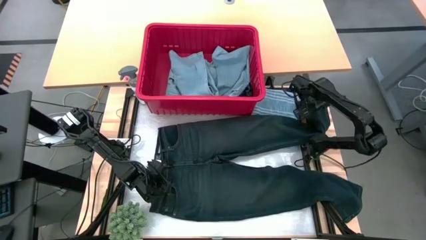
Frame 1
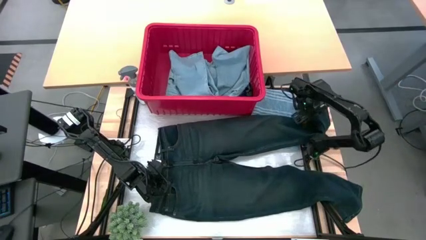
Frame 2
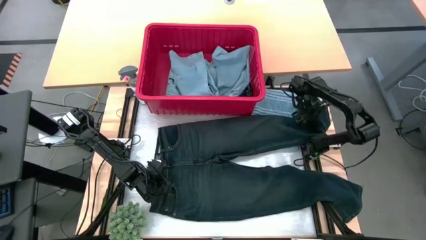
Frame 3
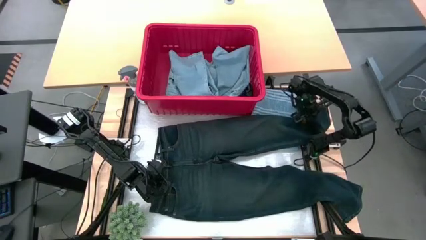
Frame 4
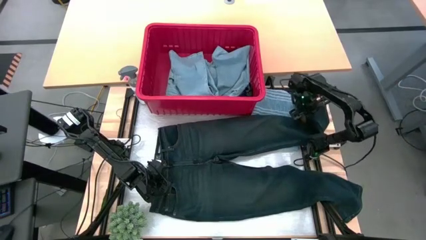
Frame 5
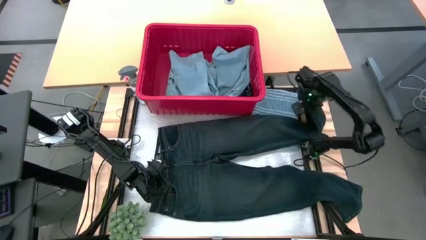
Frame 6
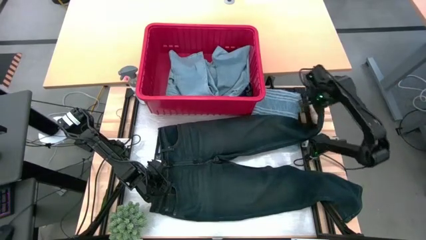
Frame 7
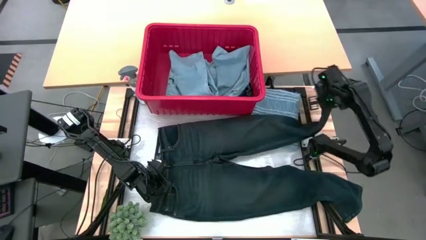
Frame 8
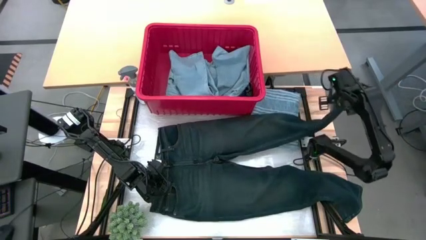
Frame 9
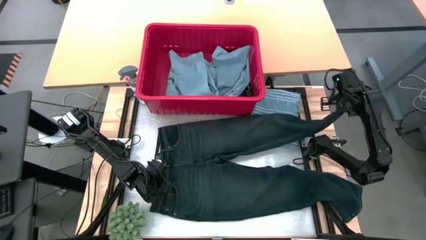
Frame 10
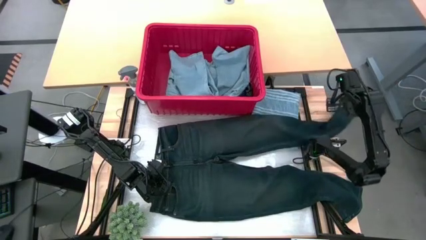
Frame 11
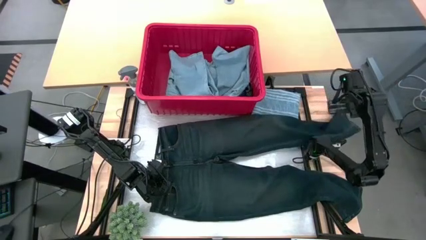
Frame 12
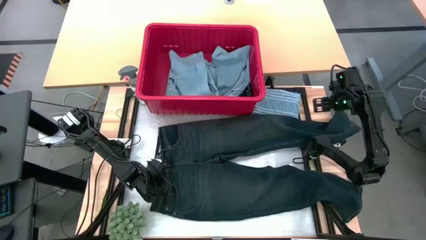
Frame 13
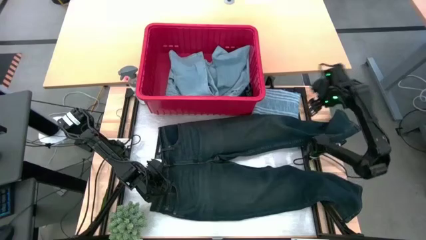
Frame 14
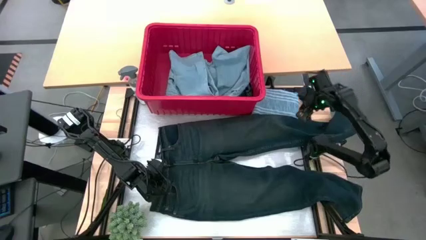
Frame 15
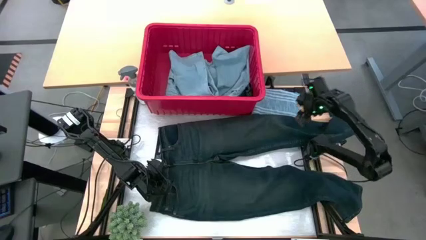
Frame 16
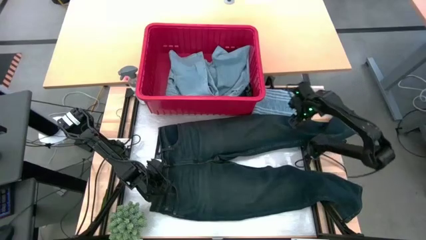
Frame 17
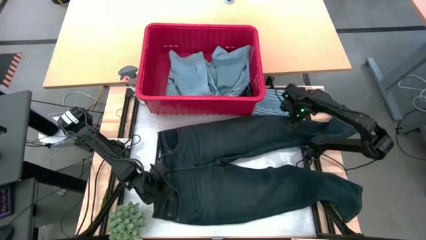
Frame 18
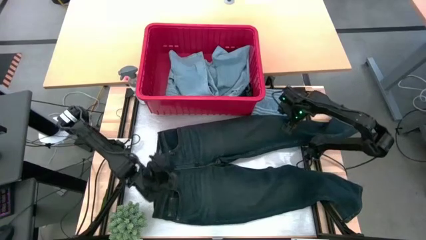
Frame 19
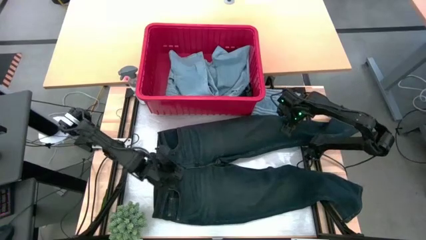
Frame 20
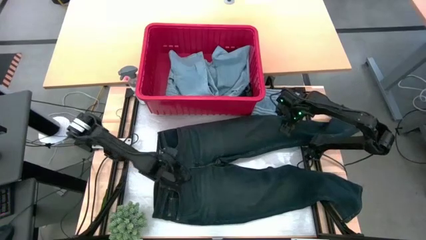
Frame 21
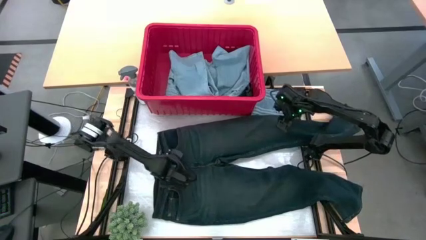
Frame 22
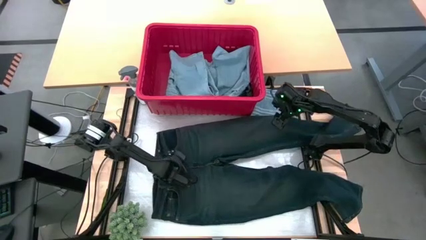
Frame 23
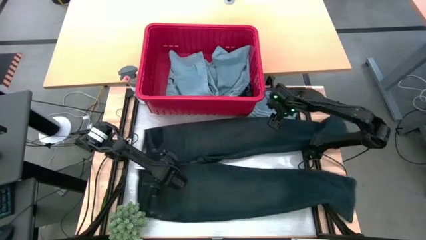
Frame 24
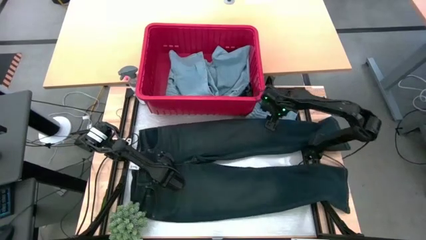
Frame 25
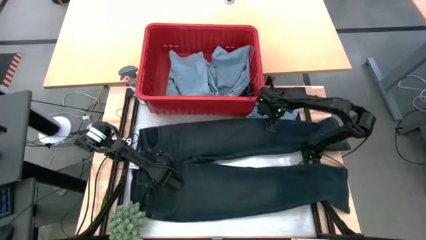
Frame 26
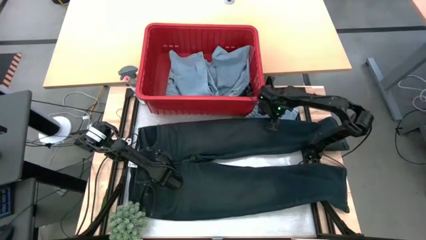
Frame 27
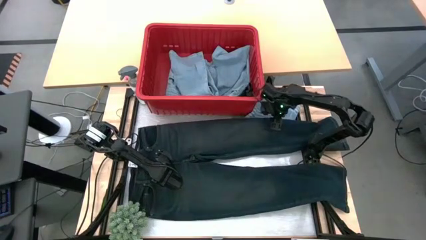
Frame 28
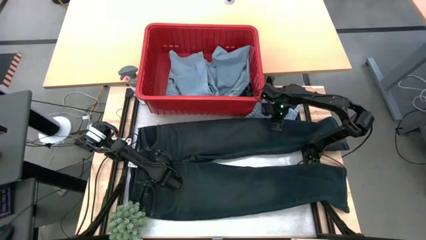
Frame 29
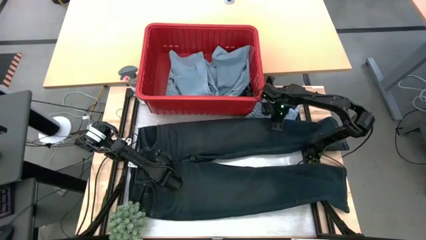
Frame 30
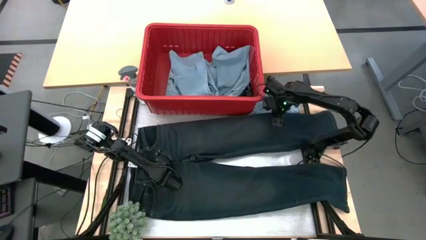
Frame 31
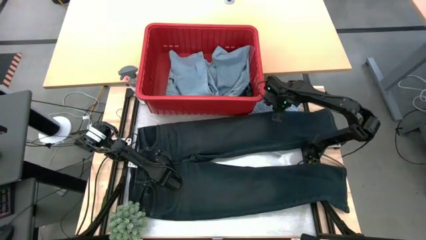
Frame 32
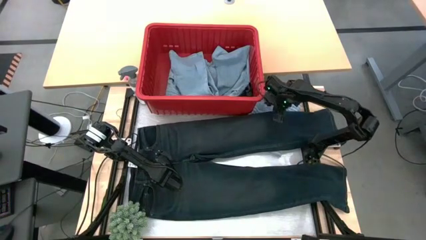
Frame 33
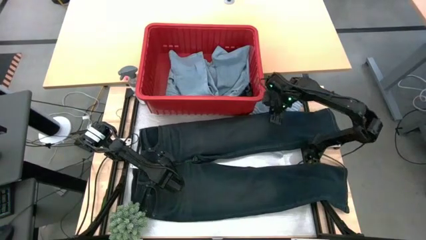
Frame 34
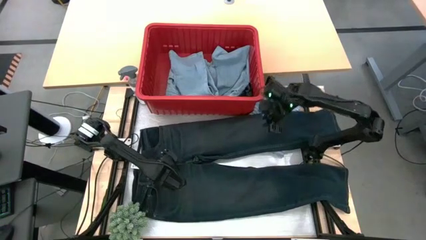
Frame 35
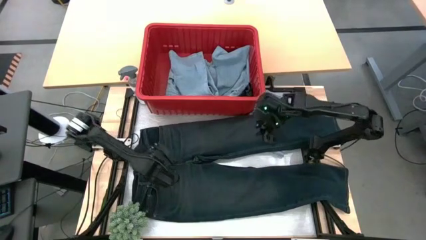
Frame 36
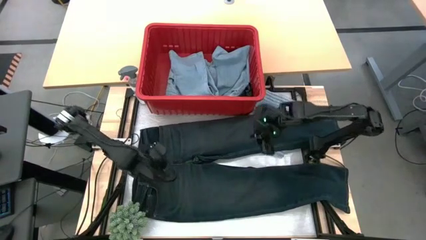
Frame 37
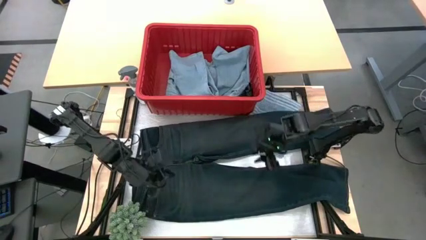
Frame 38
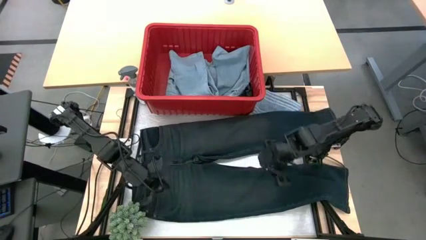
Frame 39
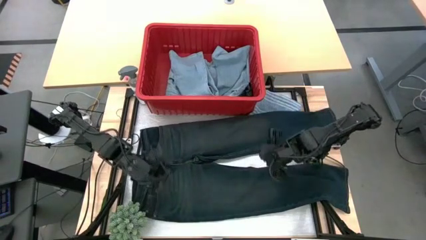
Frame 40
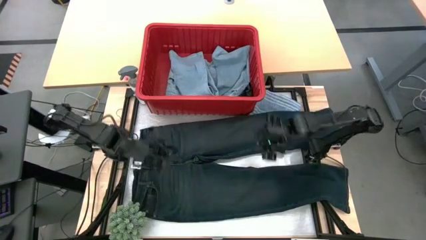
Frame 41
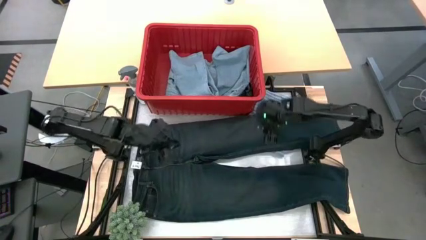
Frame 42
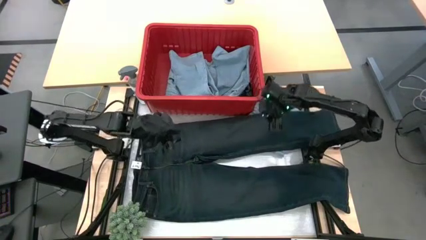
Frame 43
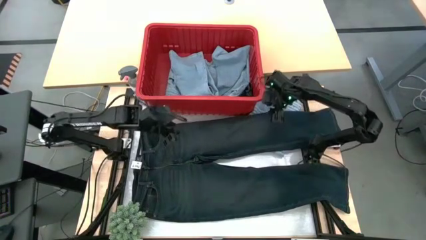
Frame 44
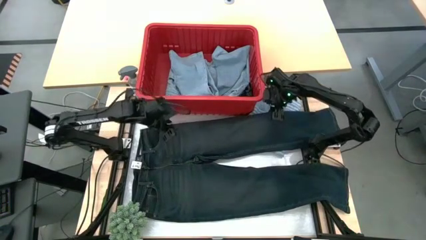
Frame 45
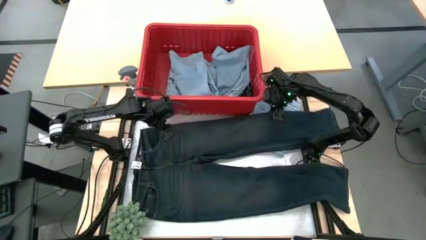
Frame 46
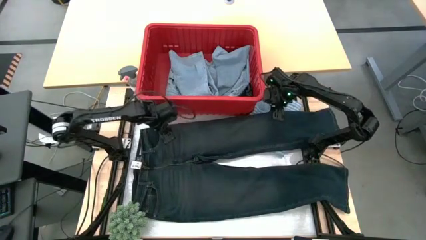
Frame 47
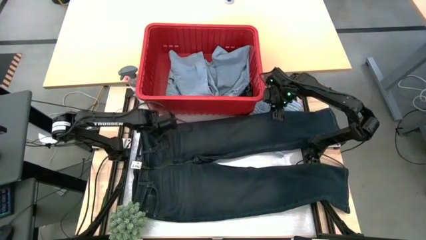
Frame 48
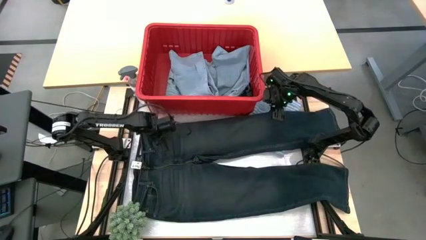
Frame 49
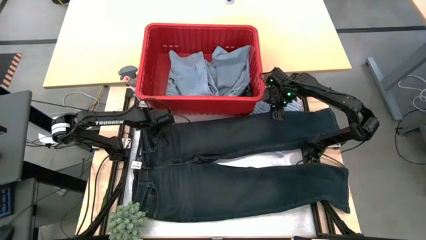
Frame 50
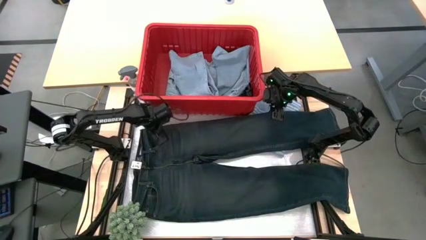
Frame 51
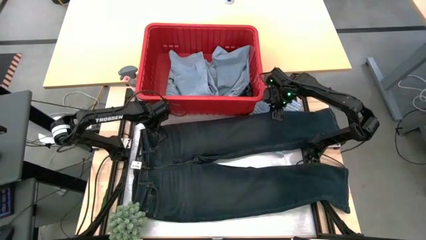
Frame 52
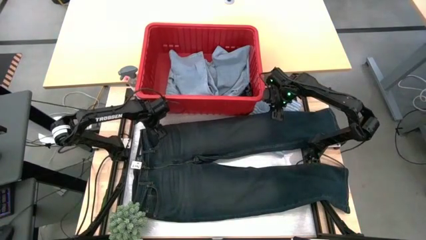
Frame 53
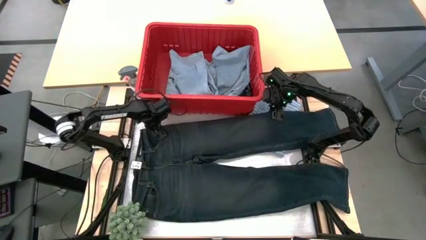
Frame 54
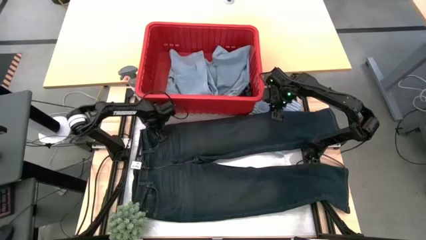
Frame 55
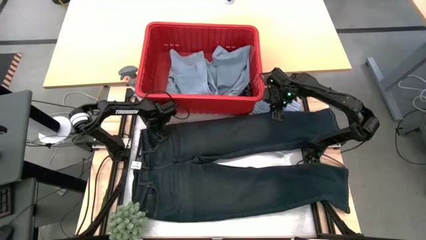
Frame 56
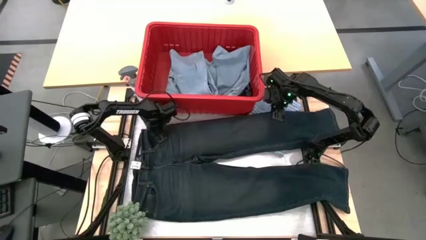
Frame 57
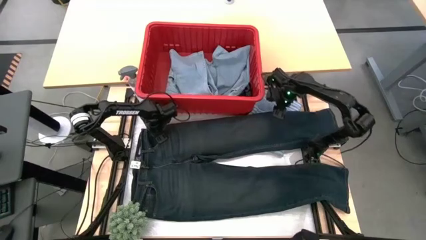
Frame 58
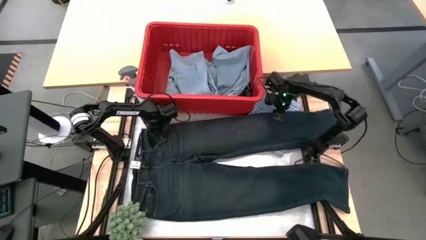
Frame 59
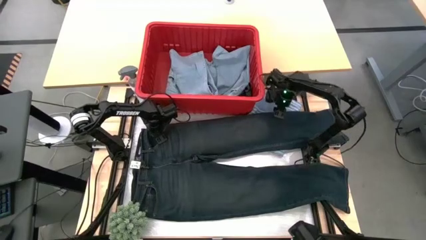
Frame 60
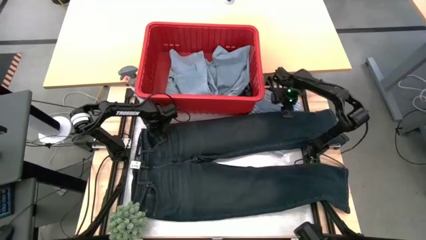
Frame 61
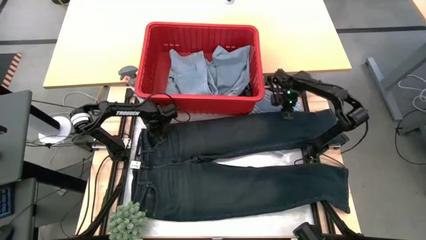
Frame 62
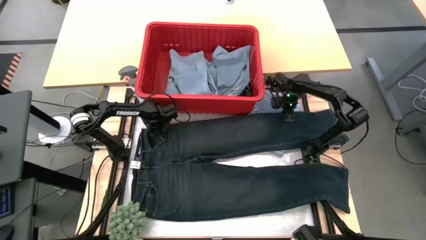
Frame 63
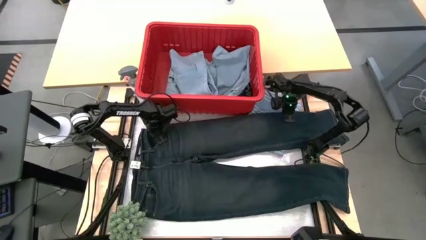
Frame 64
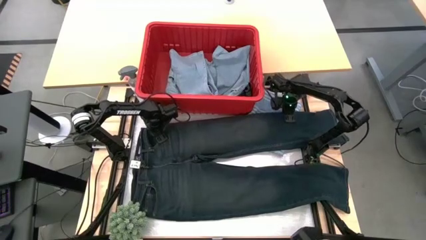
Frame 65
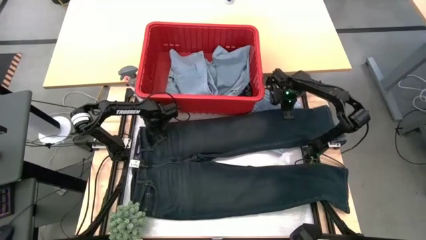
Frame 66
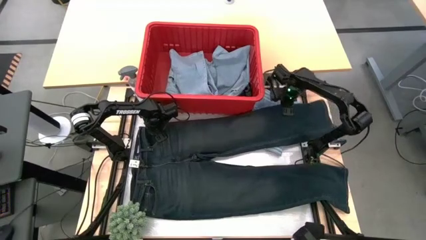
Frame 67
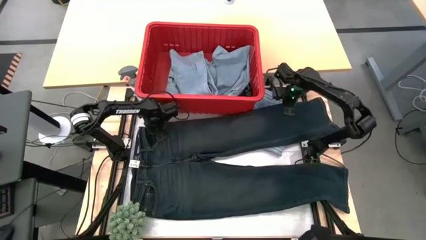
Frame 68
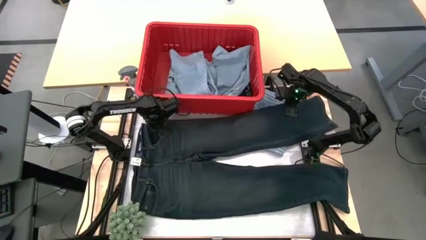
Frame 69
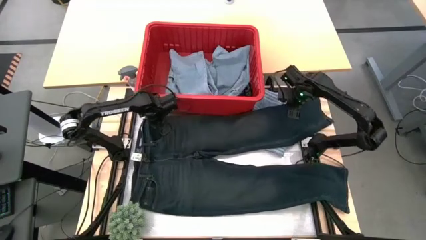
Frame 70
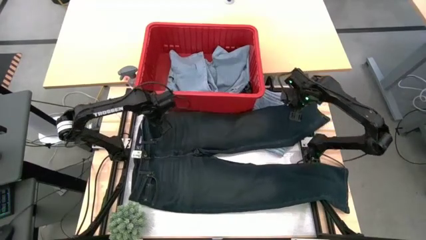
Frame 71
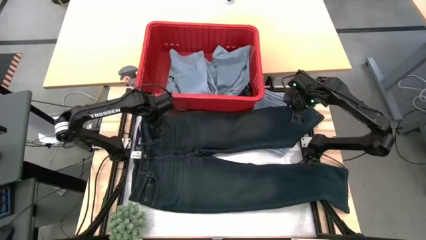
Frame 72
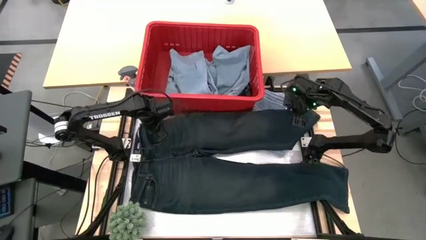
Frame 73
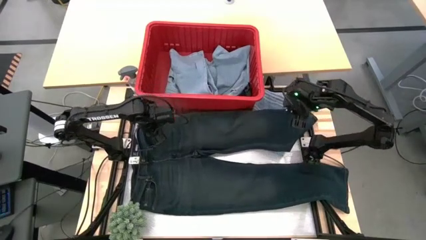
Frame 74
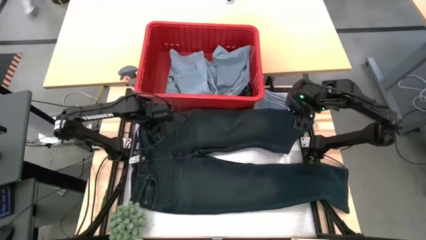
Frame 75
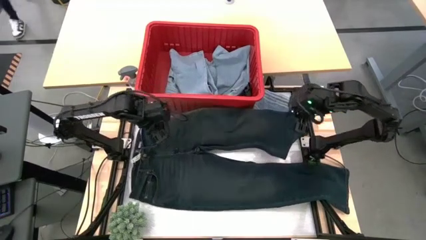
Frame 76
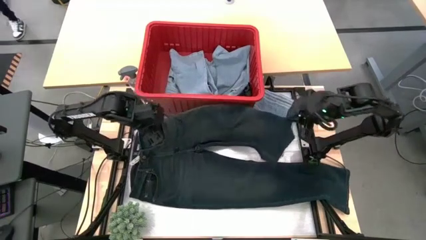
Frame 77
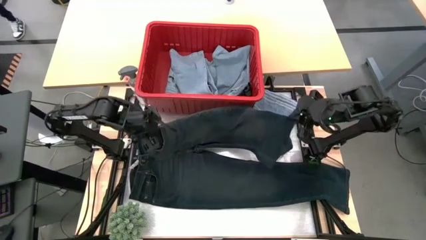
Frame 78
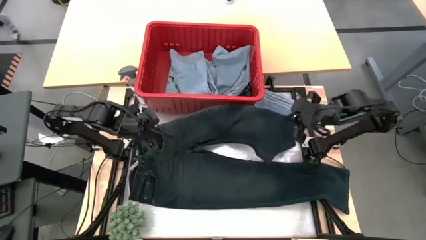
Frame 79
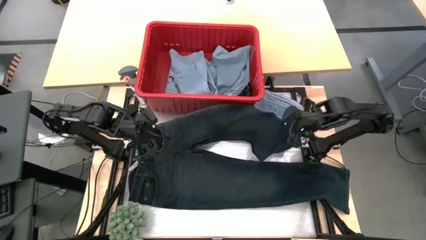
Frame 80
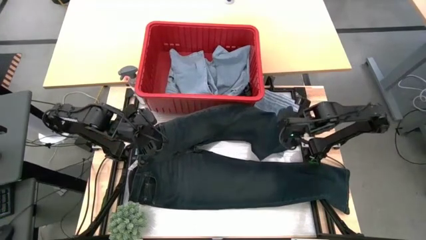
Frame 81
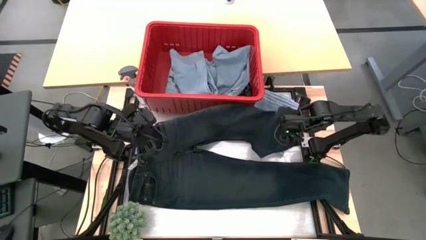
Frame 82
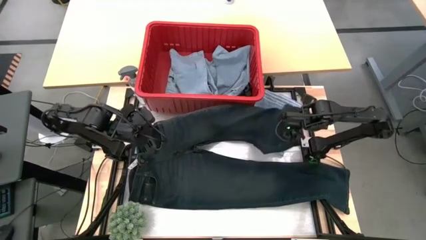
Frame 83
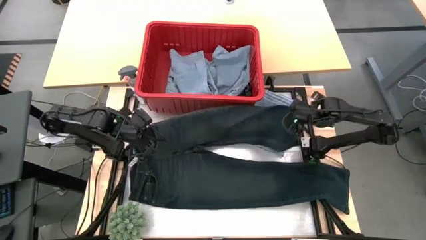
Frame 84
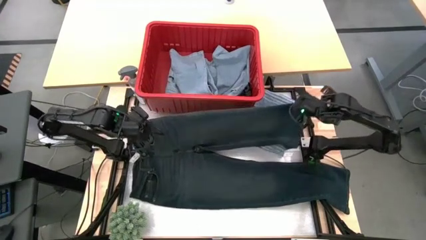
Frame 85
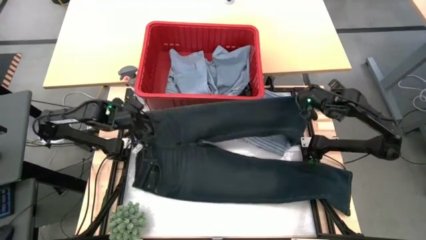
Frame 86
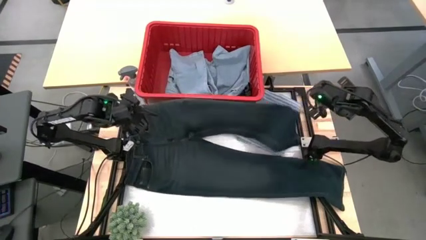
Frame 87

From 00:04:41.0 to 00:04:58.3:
Task: Fold Laundry from Bin
Fold the black pants
